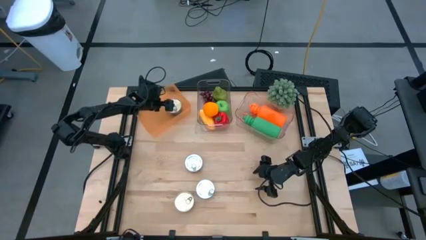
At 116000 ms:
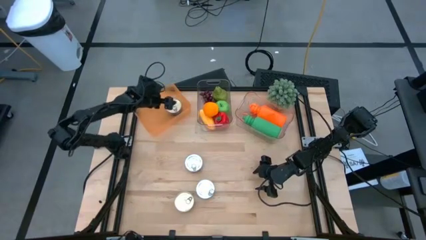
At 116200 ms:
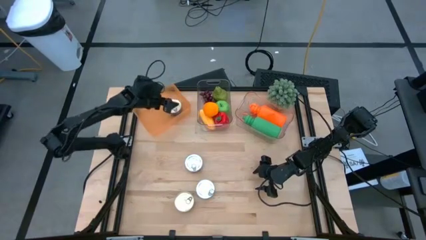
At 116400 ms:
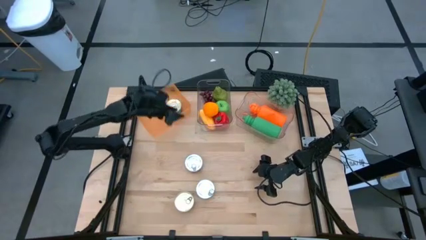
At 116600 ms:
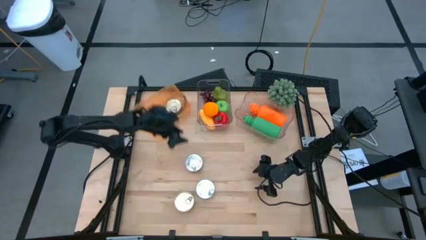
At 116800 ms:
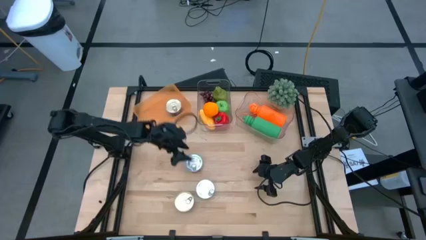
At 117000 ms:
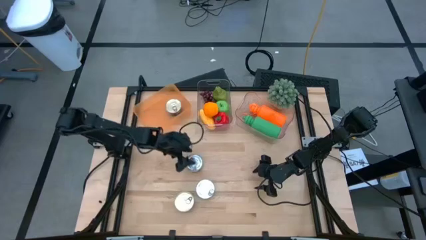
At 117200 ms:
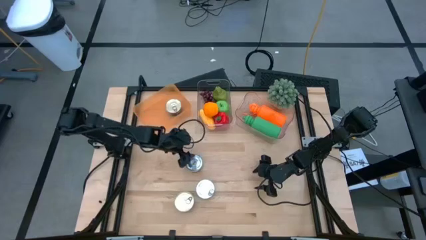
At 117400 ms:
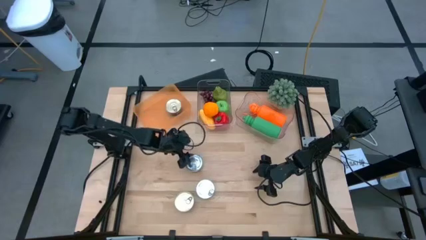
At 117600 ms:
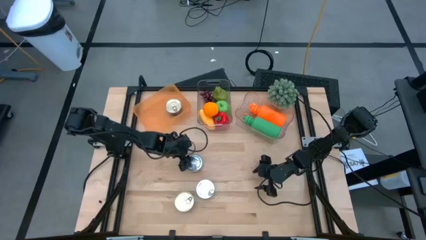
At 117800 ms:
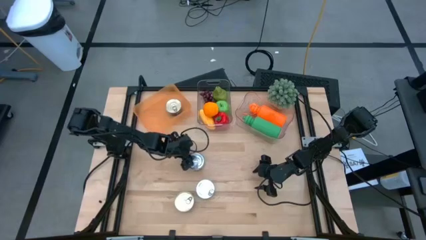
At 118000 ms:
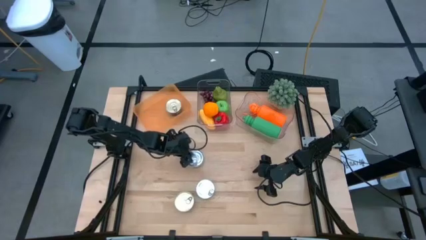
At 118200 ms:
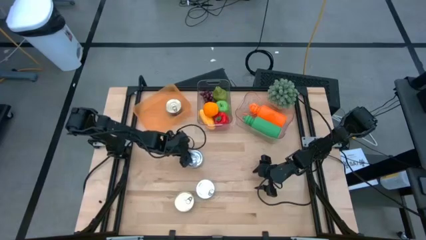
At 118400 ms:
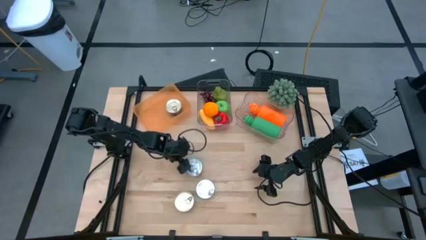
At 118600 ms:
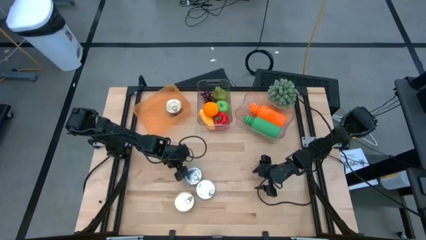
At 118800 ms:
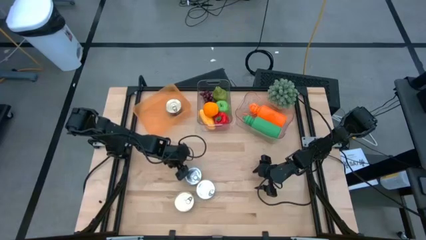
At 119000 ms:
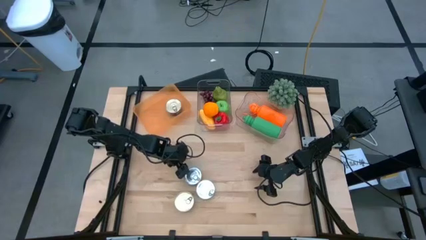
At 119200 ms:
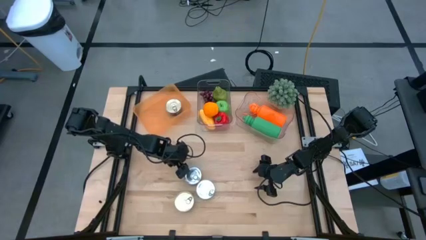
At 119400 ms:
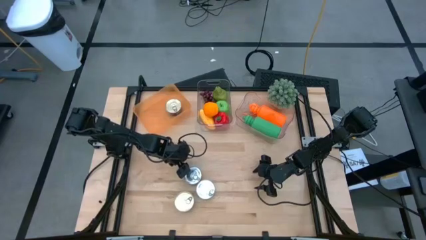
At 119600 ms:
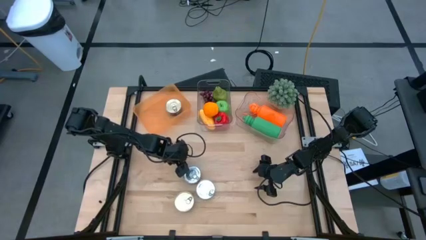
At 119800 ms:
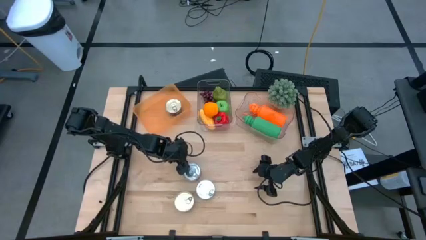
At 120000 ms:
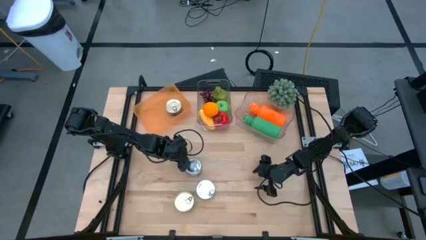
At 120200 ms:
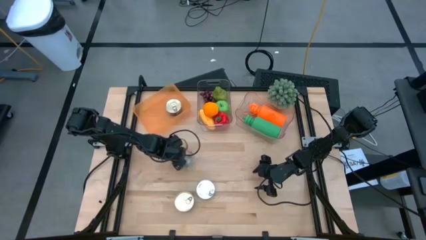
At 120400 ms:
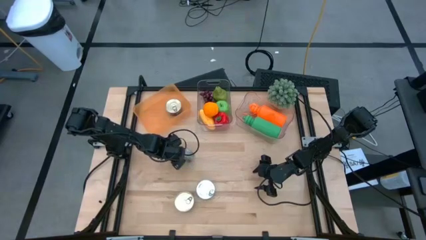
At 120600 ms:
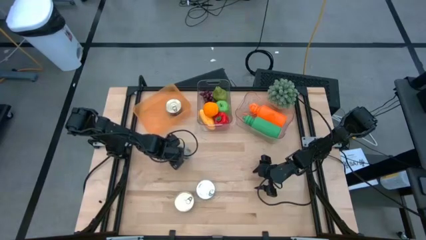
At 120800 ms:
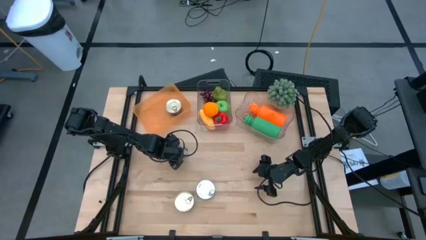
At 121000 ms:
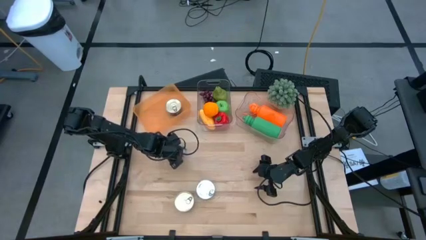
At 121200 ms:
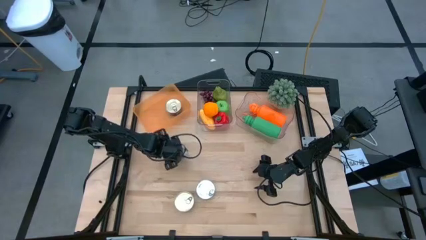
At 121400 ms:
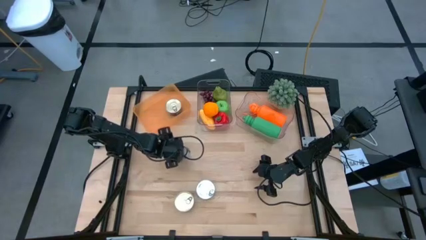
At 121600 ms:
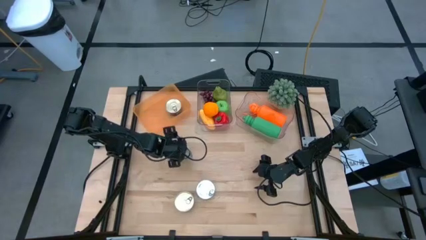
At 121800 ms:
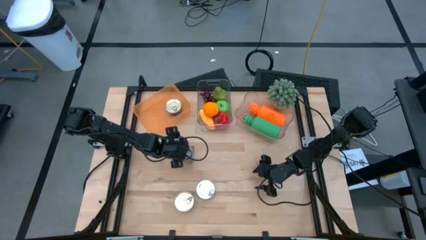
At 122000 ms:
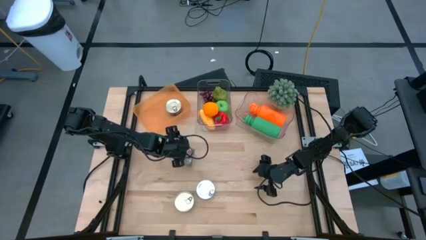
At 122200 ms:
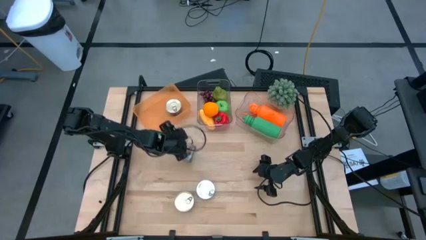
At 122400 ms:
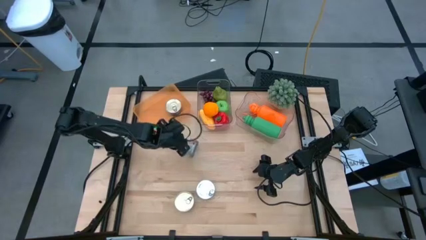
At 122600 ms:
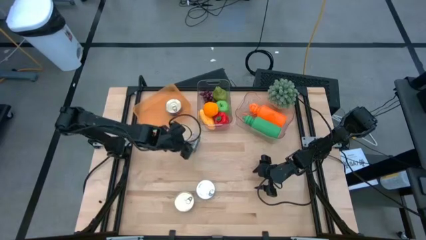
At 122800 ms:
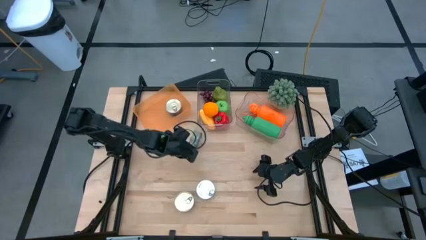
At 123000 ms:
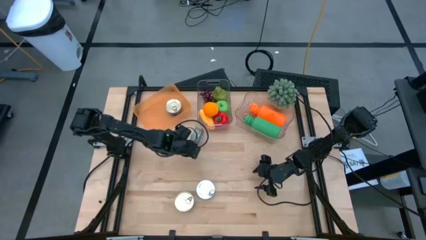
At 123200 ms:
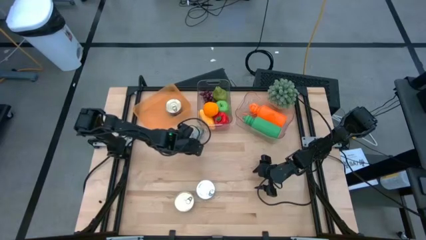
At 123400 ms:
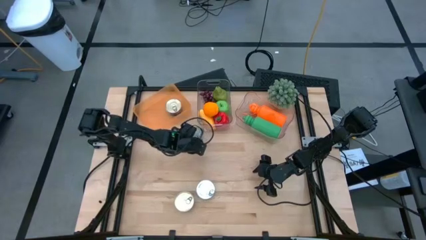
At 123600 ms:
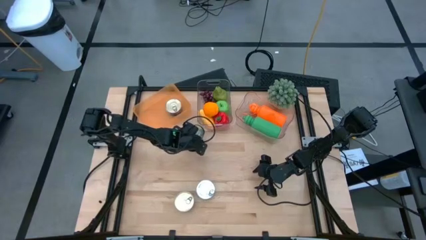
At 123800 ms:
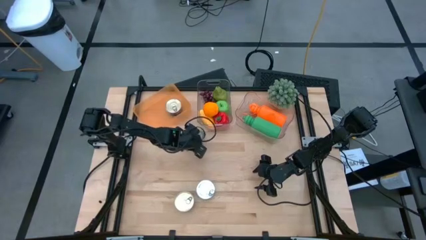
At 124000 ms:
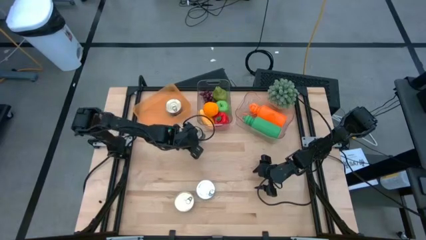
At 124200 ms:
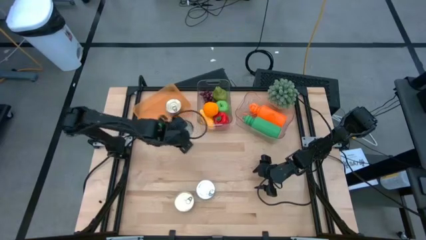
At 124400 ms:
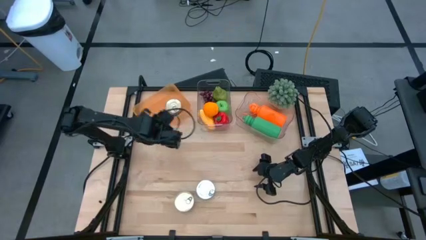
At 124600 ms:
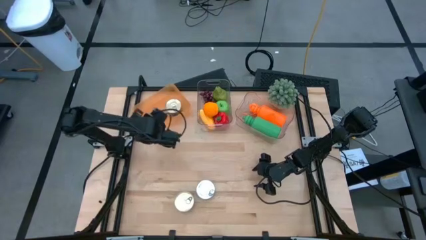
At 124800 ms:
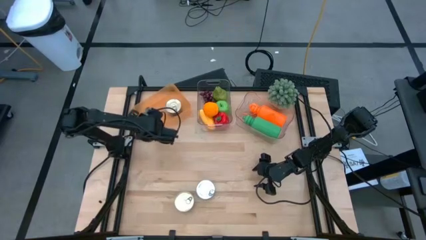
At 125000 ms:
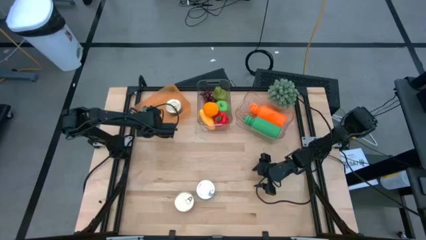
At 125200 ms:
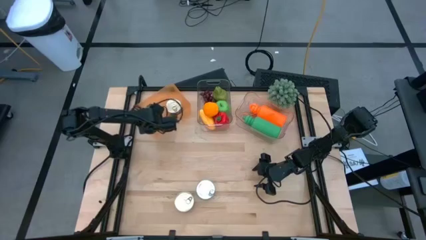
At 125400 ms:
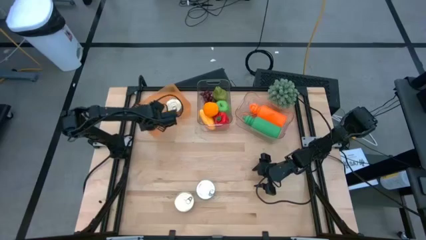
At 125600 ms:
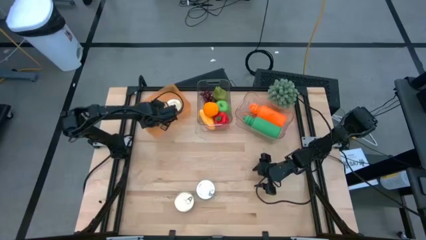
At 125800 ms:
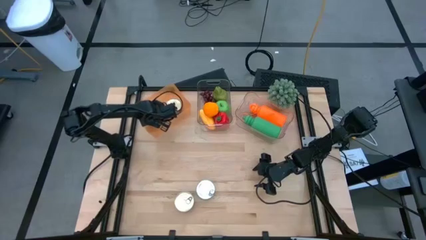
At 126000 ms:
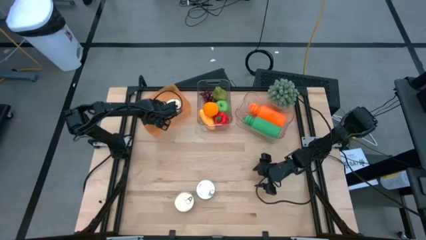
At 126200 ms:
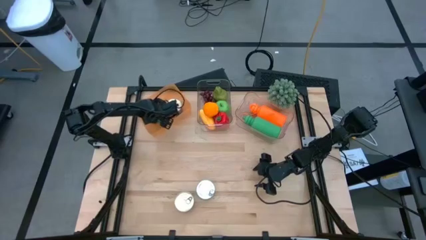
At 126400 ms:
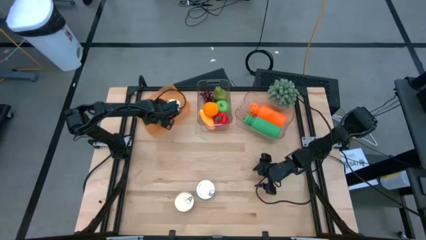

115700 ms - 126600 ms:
Task: Pick & Place Food Item
Put the top green tuna can into the orange bin
